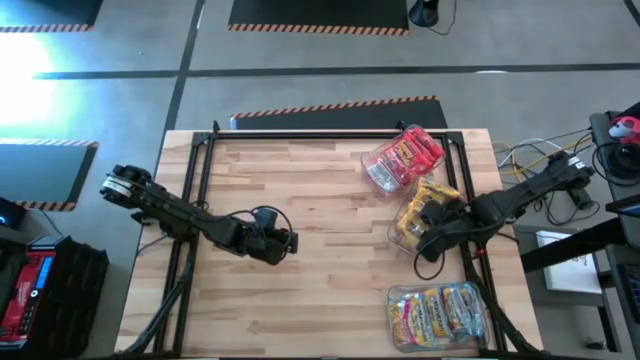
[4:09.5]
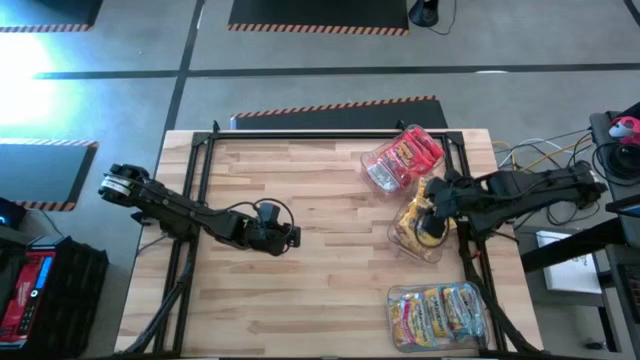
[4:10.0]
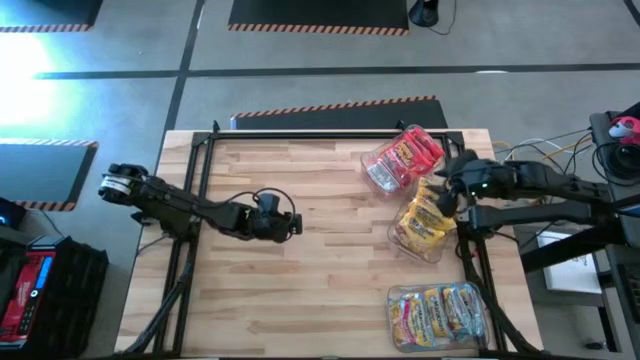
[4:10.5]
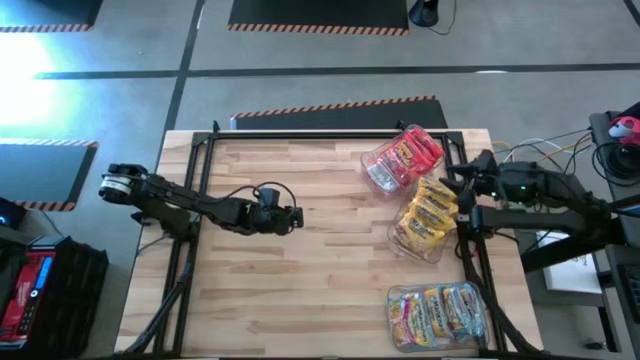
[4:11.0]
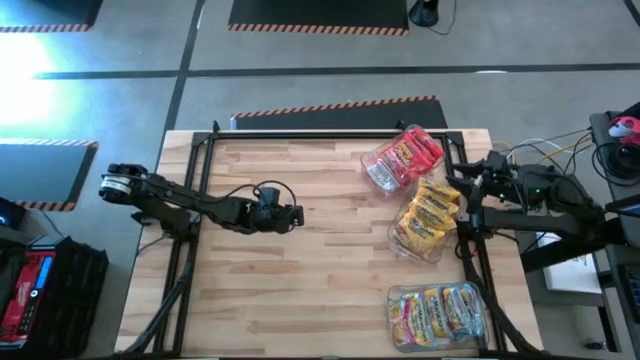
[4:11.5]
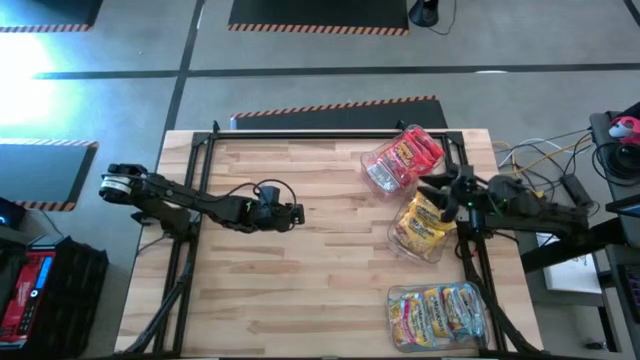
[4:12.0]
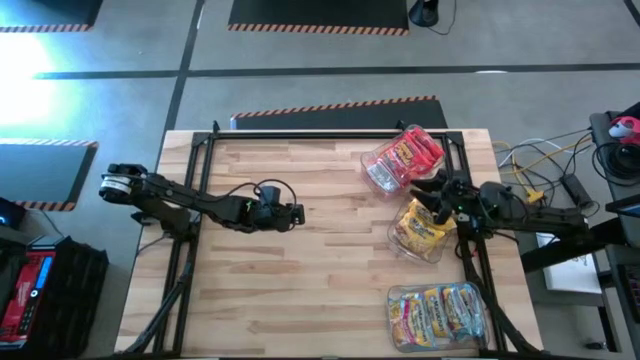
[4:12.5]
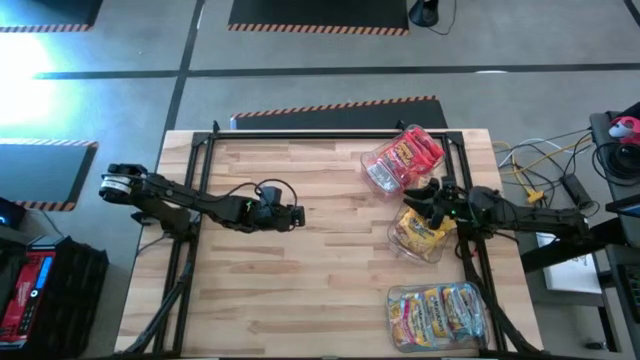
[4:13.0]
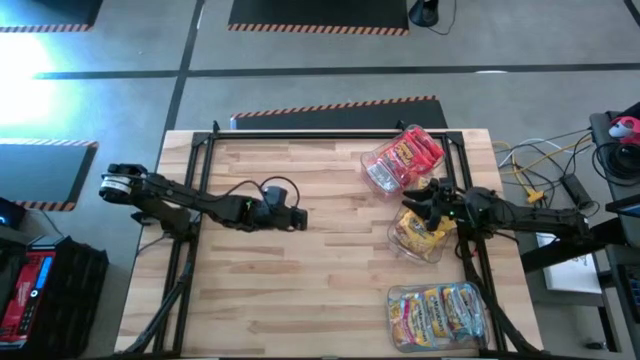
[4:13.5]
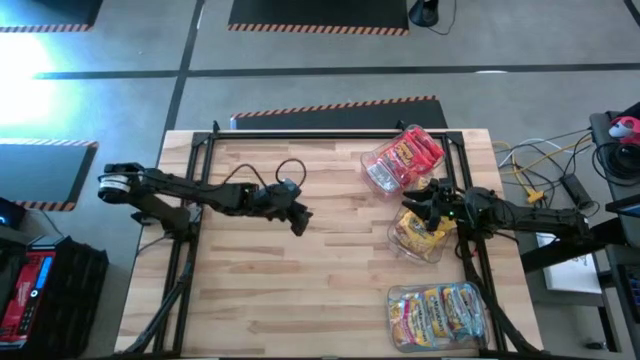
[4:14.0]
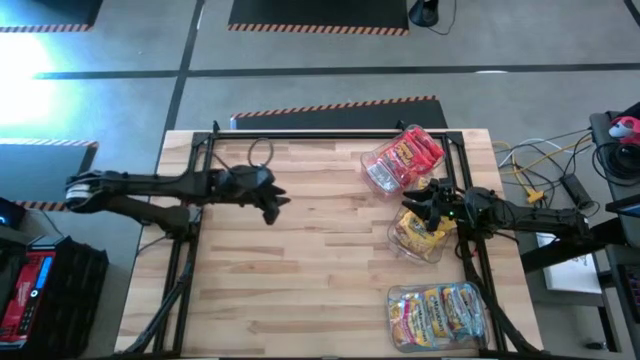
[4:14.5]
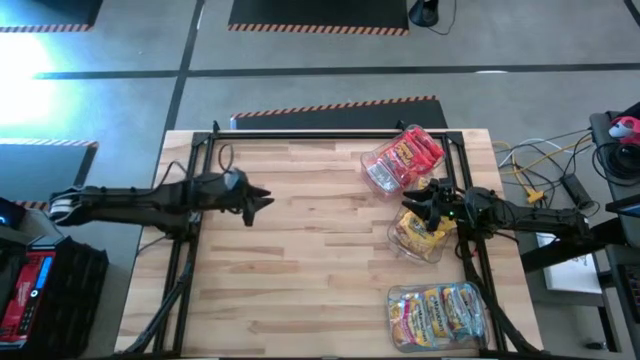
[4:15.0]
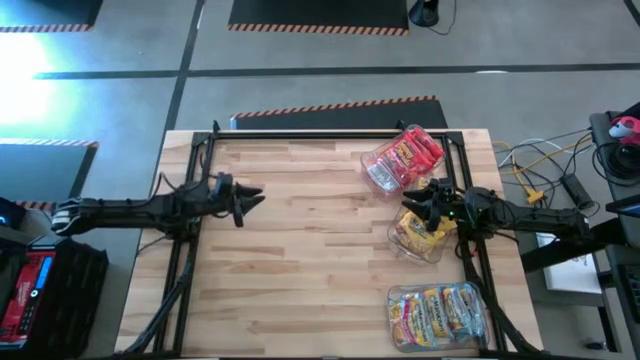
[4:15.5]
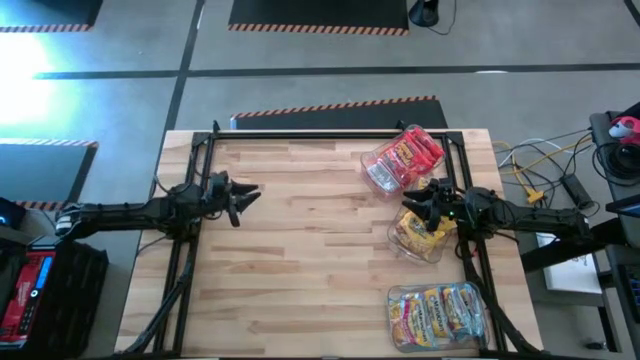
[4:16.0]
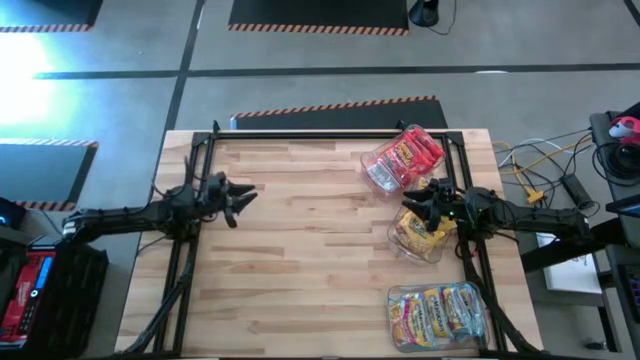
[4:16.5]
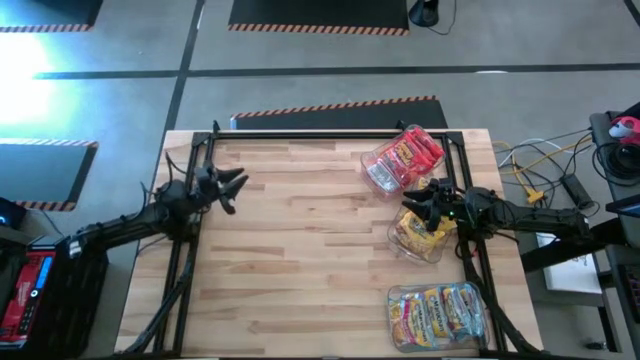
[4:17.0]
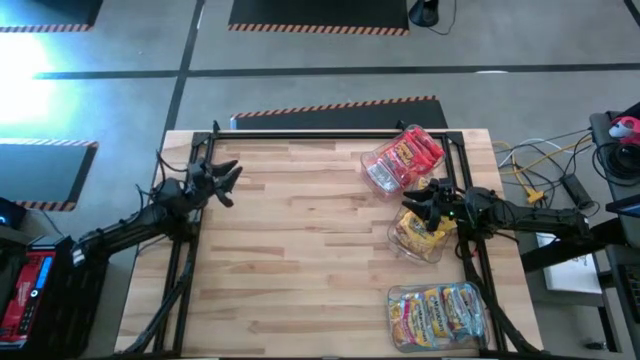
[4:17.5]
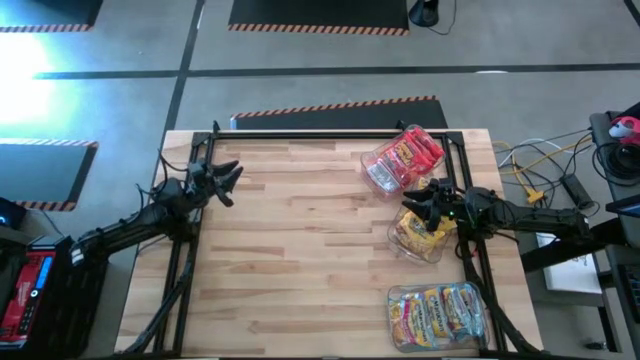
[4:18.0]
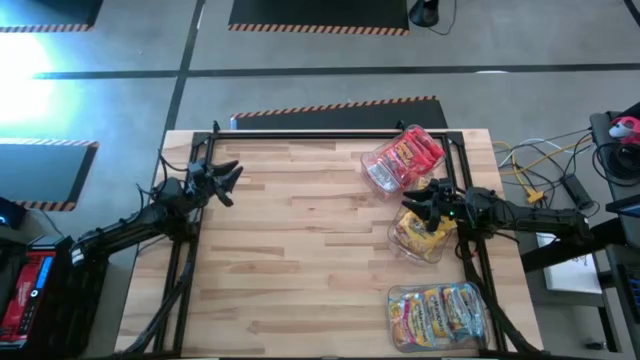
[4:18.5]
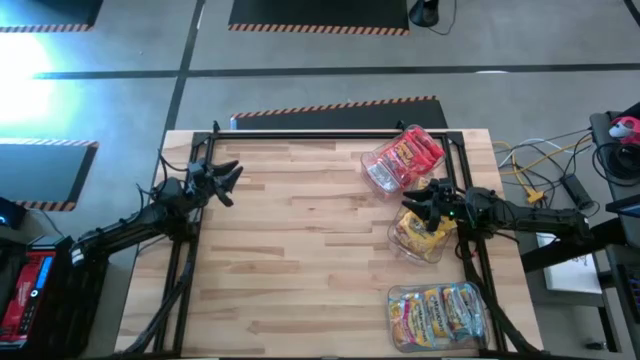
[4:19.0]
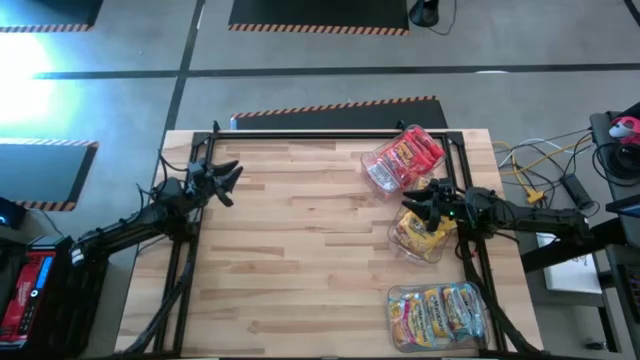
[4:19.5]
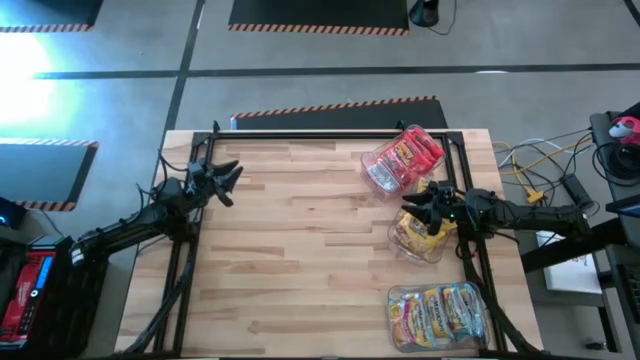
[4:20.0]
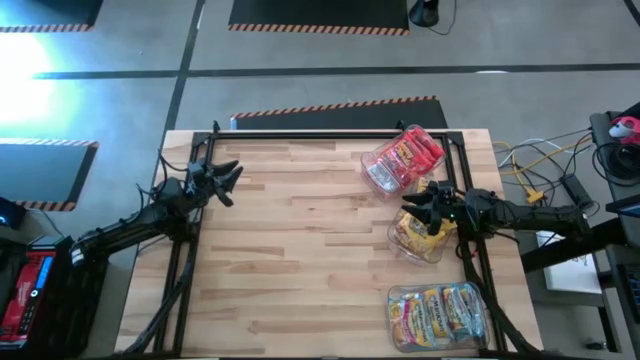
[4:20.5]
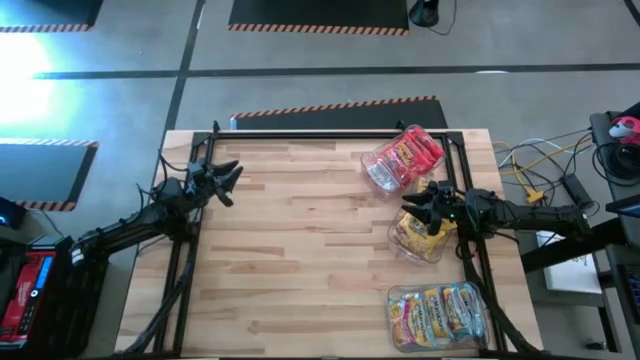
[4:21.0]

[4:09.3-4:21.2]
Task: Sort Maruchan noodles
Return to Home Position

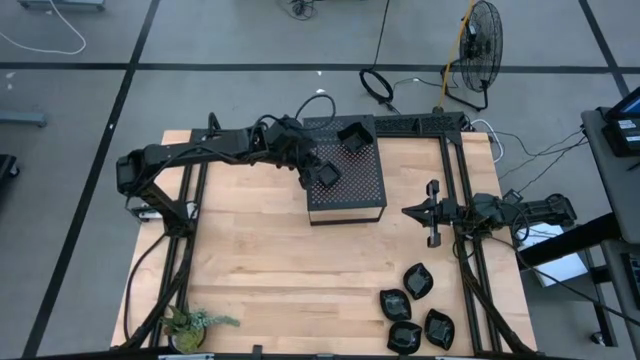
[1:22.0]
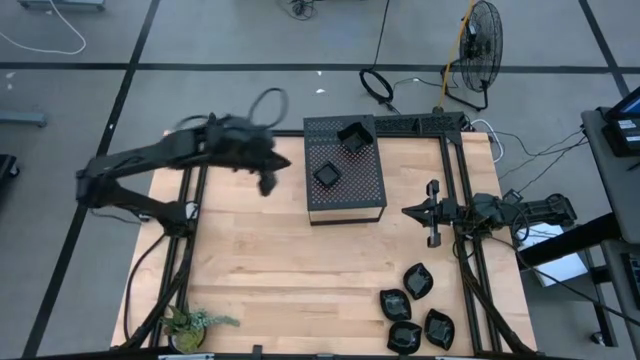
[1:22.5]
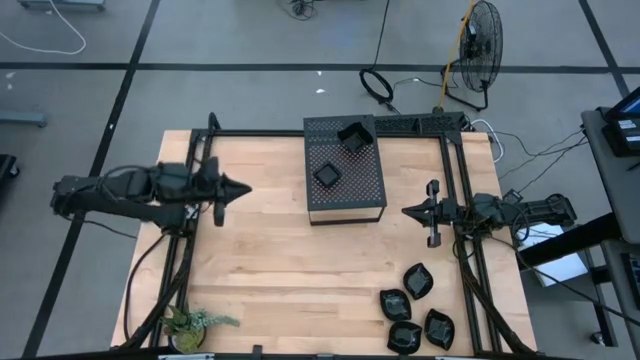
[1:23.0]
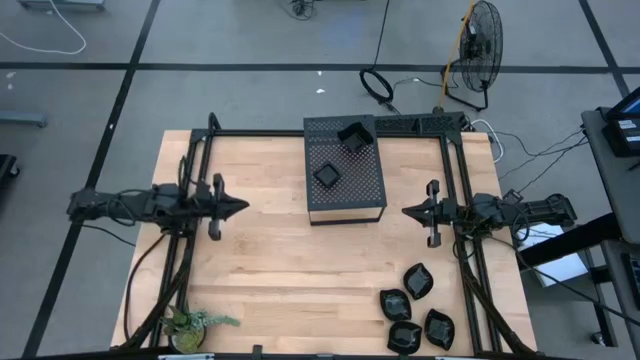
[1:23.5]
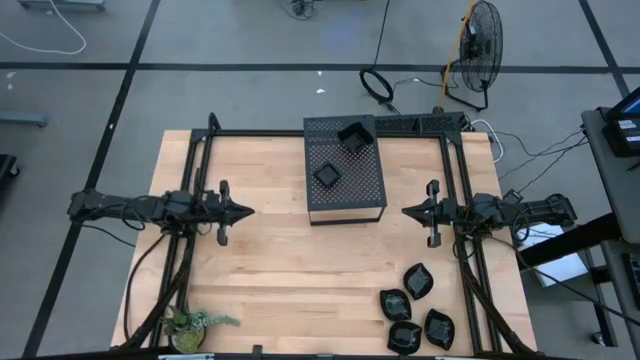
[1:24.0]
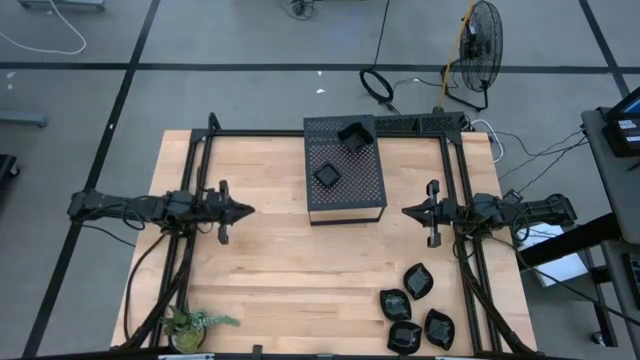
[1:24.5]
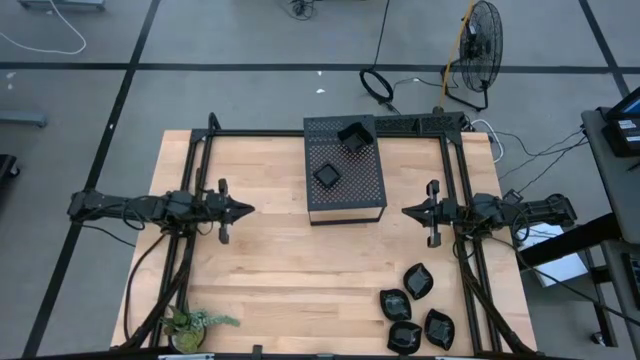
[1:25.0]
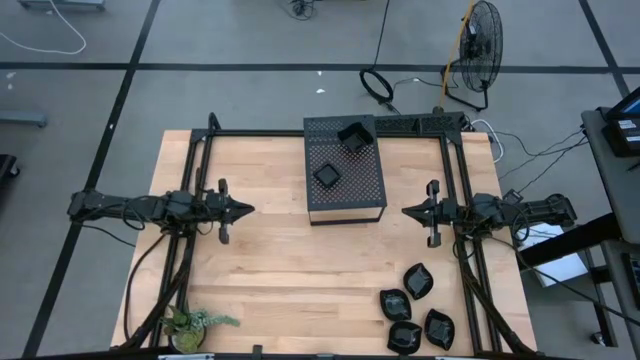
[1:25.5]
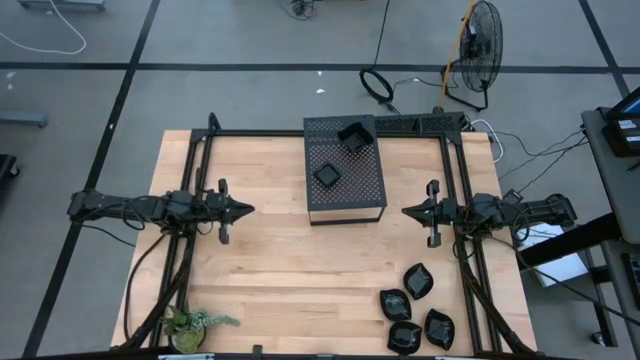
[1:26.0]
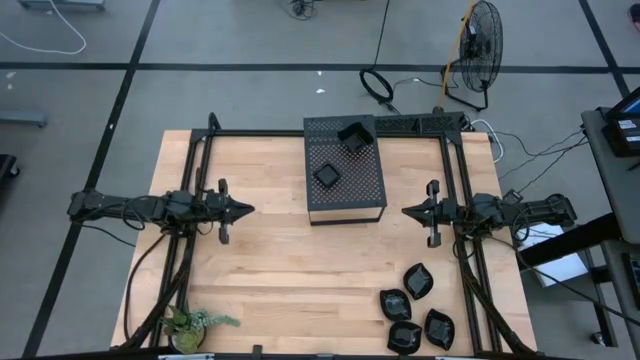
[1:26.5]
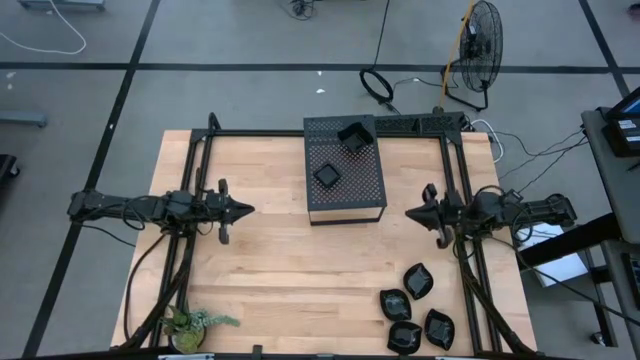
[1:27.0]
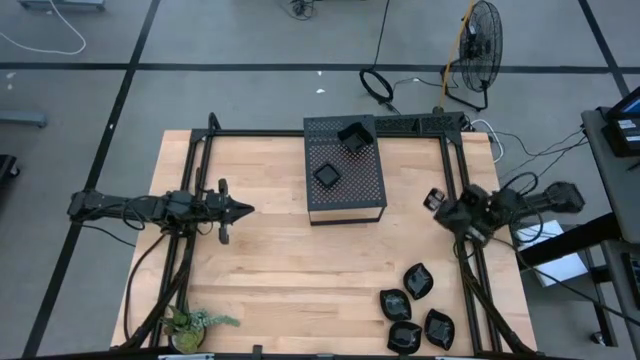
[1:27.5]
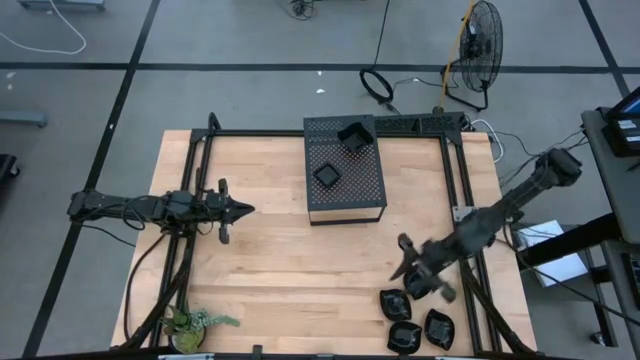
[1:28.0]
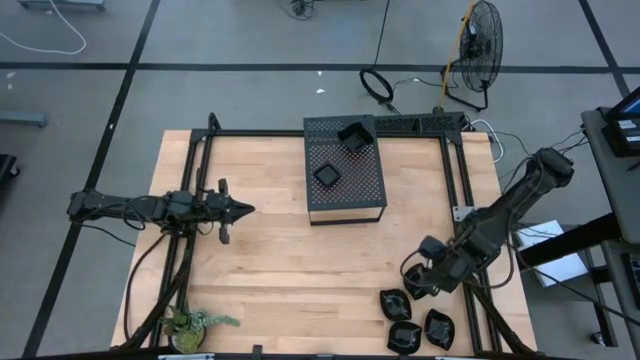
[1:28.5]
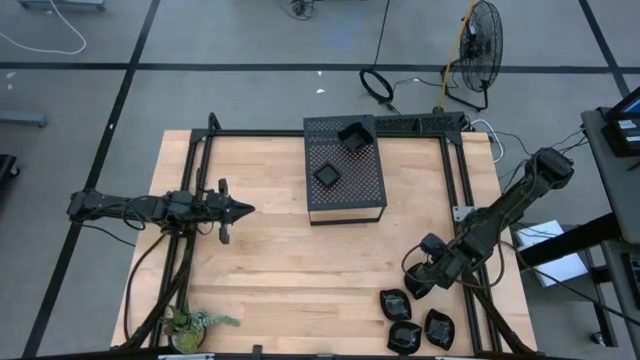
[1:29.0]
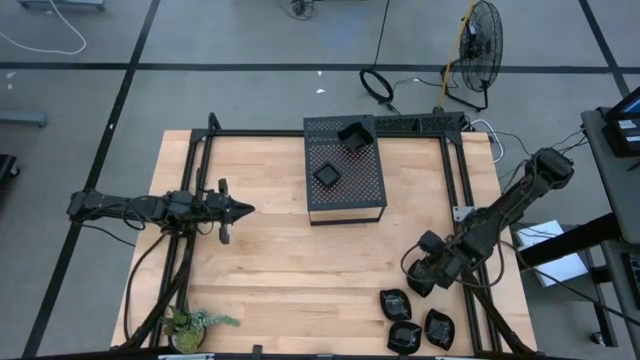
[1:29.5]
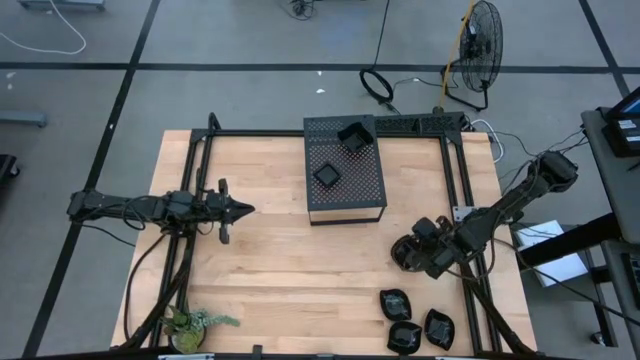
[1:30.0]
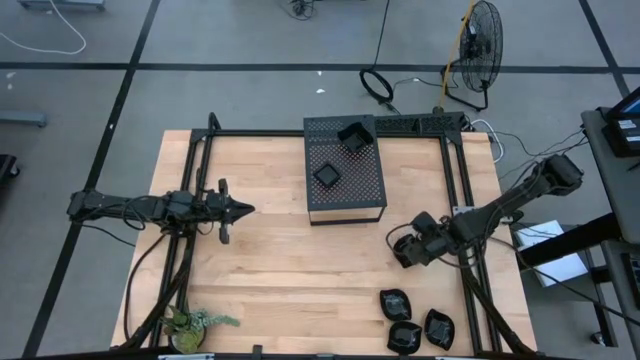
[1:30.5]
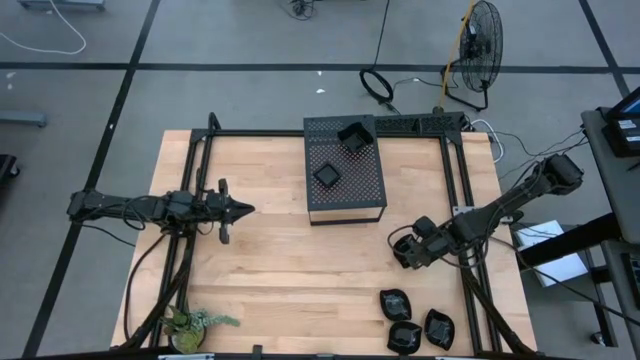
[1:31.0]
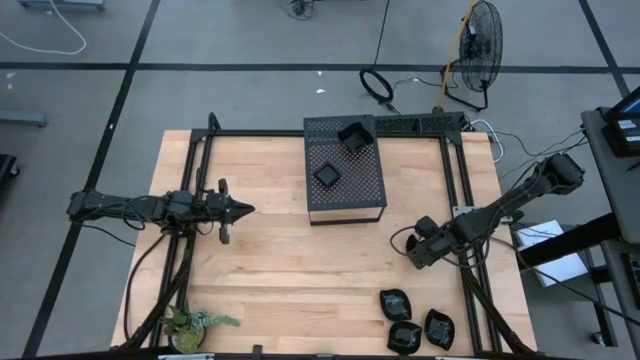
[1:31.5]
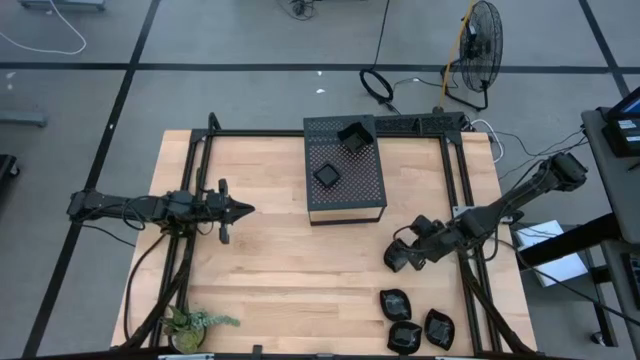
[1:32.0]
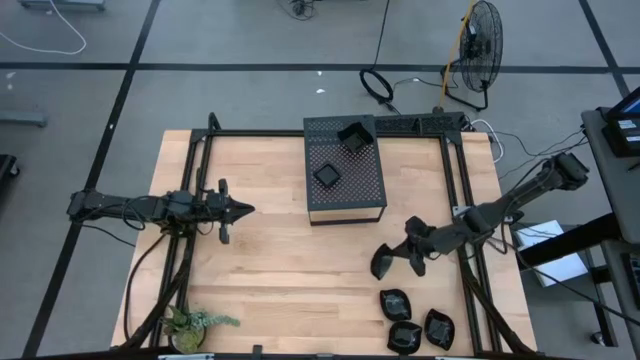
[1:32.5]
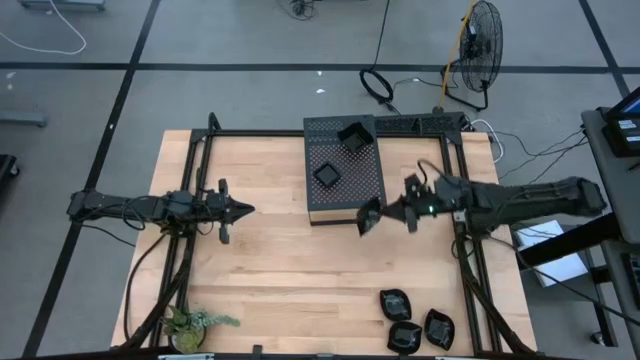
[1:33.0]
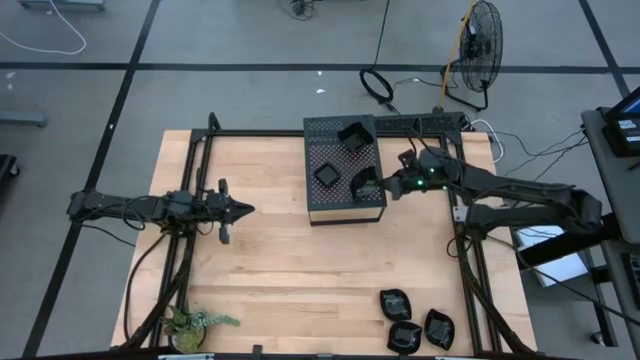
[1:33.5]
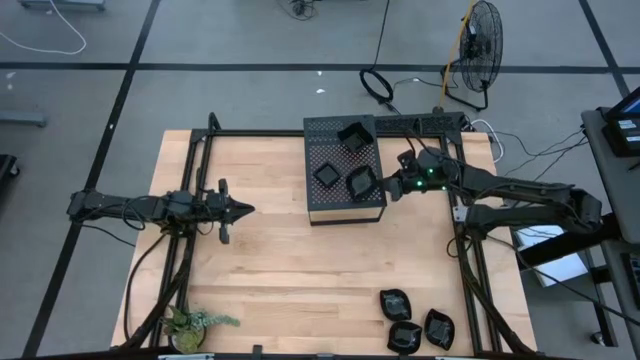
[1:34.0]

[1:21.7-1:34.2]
Task: Pick & Place Mini shaped plates
Put the leaf shaped plate on the shelf
